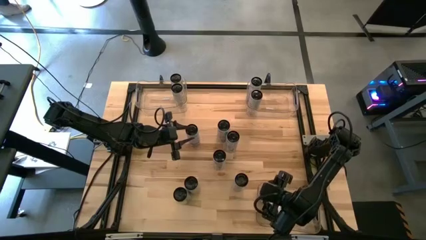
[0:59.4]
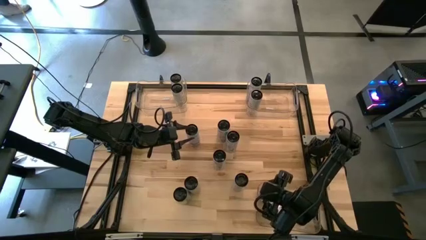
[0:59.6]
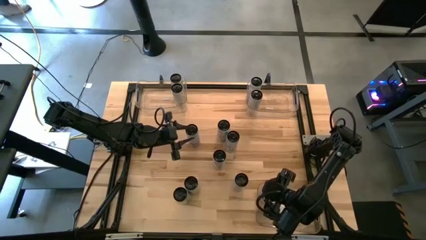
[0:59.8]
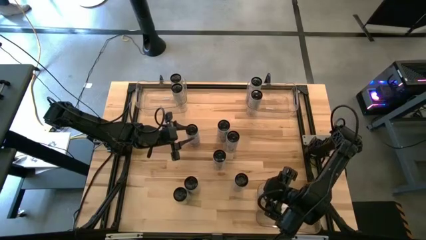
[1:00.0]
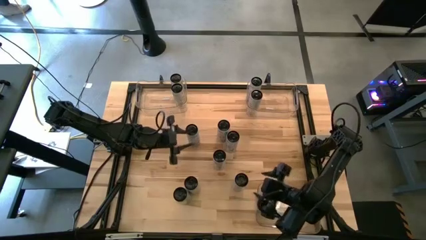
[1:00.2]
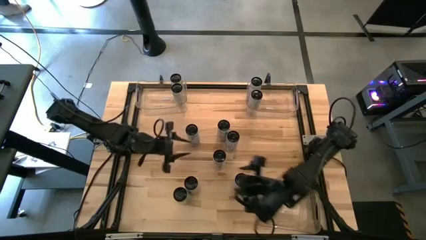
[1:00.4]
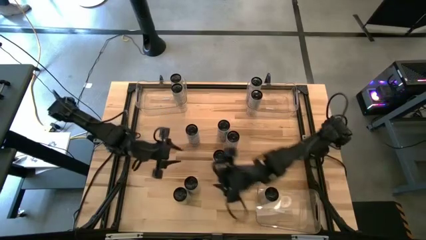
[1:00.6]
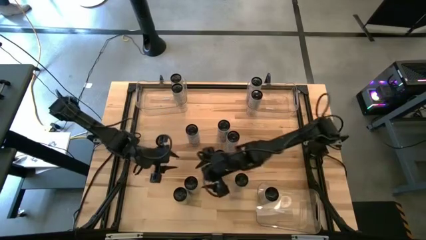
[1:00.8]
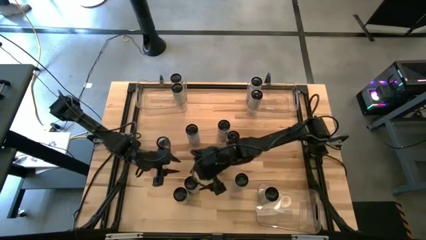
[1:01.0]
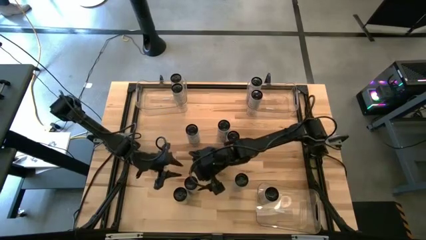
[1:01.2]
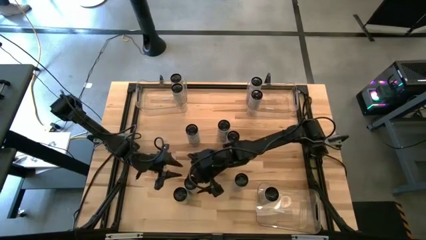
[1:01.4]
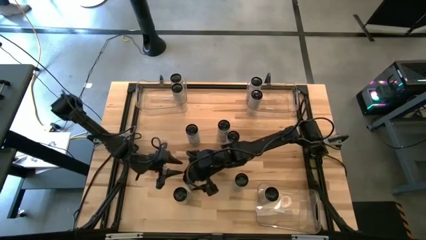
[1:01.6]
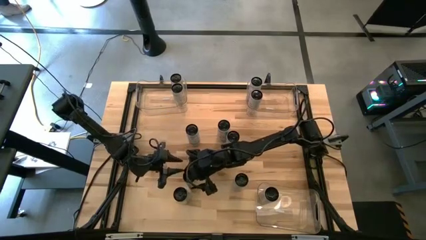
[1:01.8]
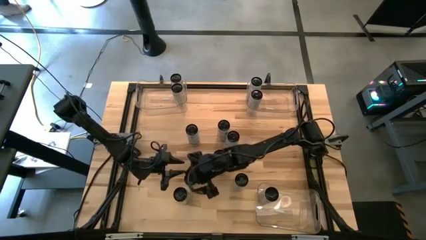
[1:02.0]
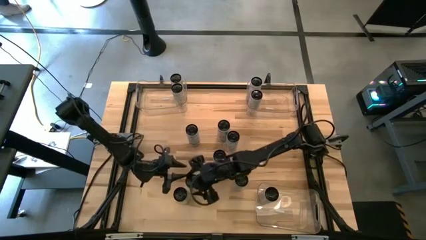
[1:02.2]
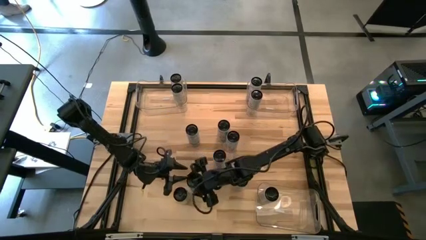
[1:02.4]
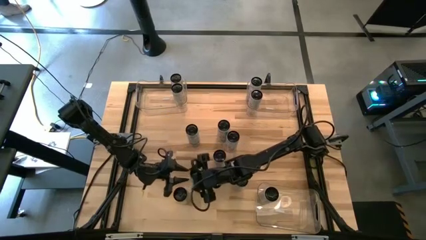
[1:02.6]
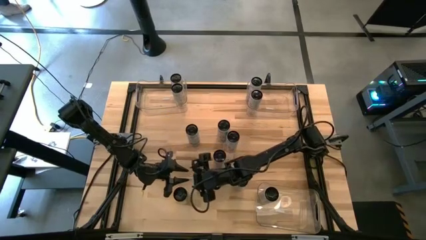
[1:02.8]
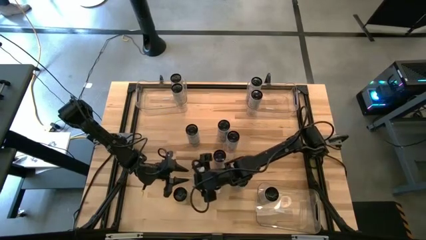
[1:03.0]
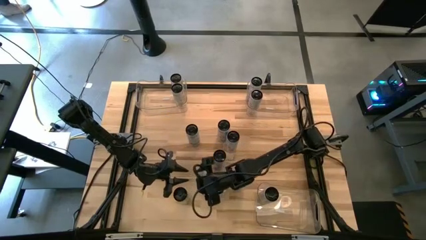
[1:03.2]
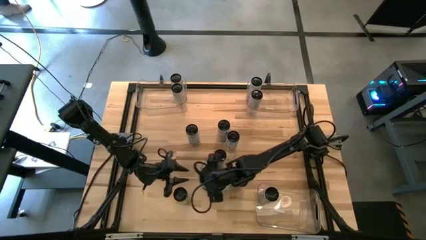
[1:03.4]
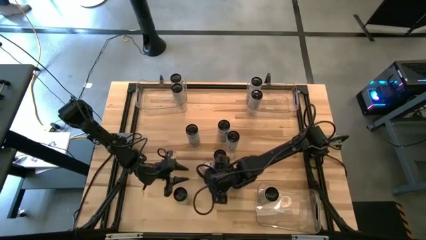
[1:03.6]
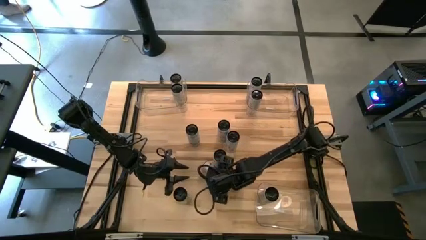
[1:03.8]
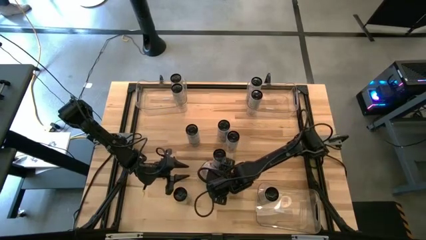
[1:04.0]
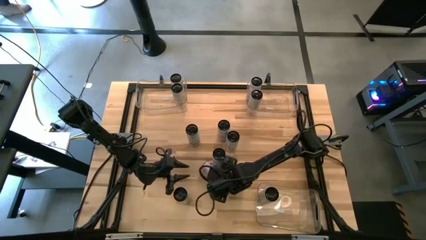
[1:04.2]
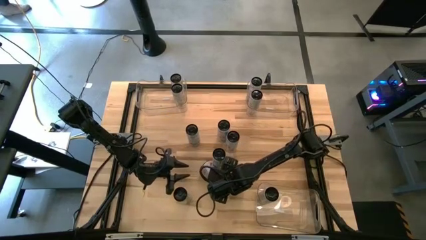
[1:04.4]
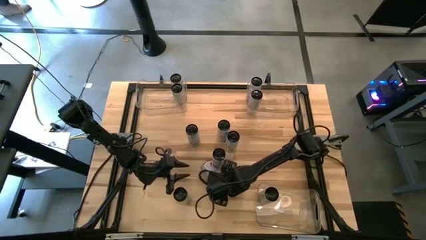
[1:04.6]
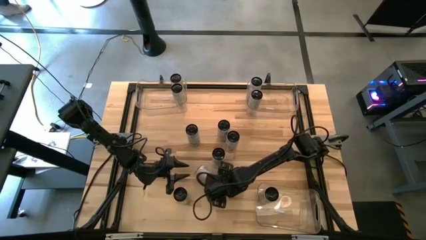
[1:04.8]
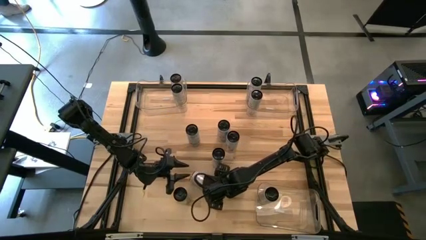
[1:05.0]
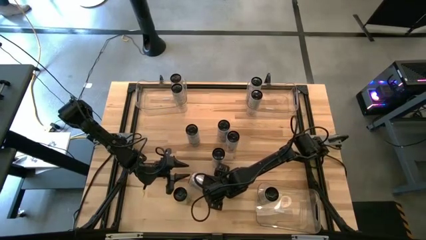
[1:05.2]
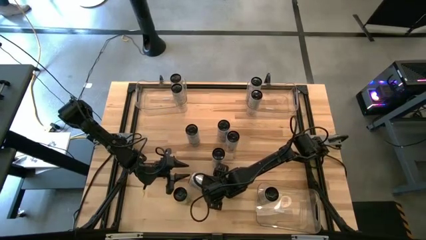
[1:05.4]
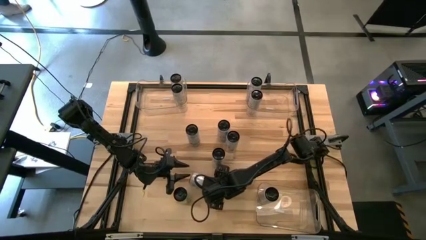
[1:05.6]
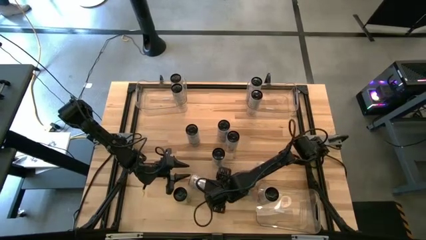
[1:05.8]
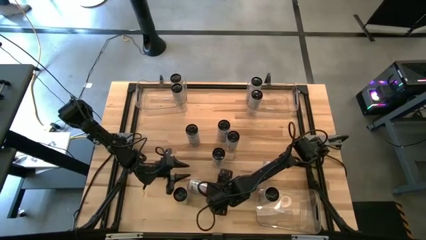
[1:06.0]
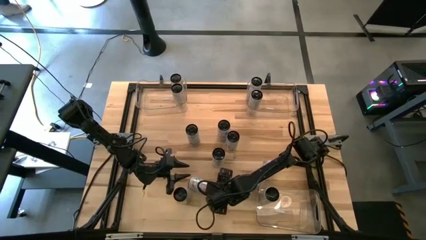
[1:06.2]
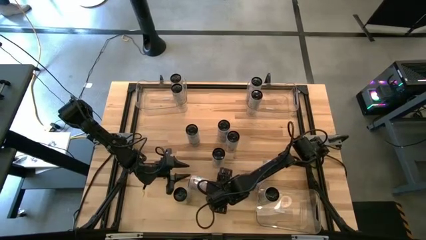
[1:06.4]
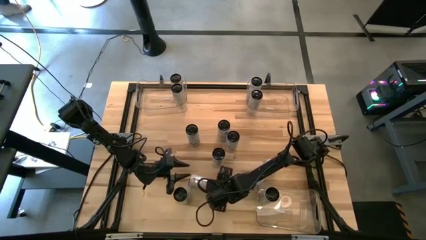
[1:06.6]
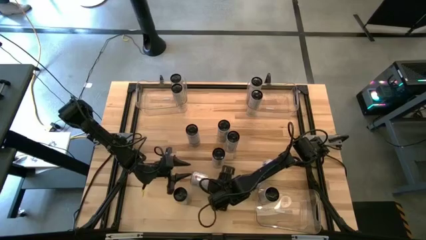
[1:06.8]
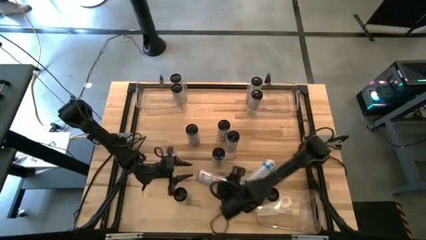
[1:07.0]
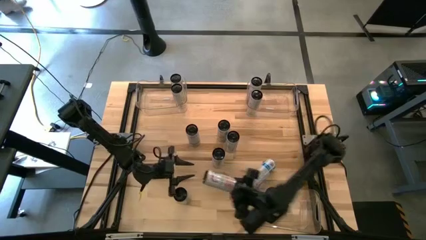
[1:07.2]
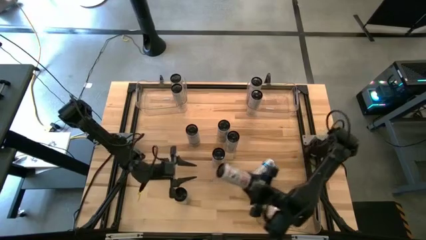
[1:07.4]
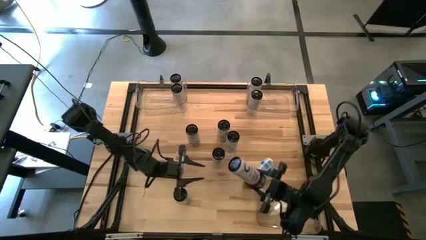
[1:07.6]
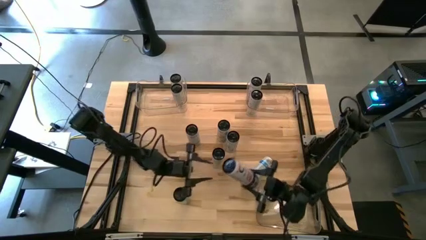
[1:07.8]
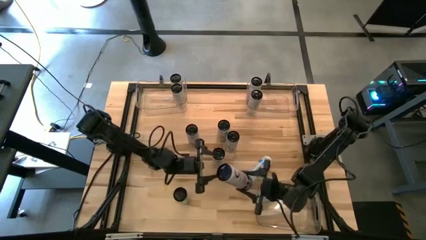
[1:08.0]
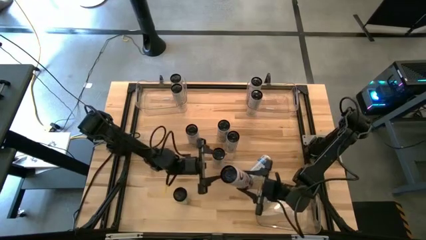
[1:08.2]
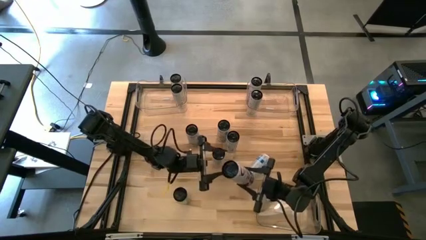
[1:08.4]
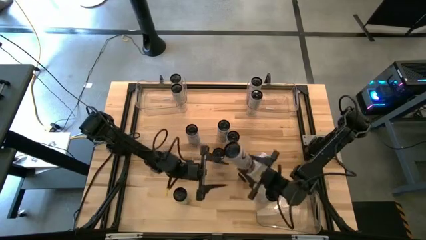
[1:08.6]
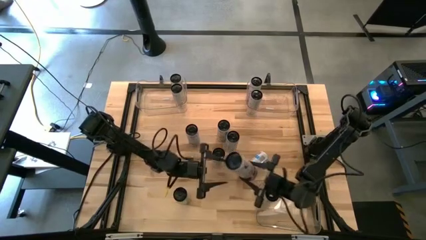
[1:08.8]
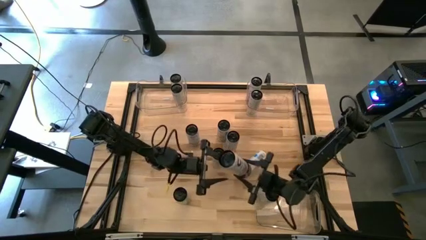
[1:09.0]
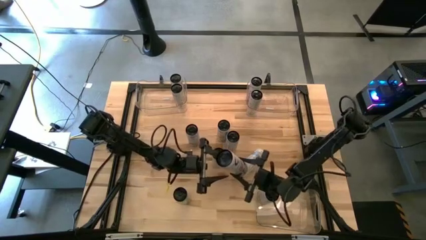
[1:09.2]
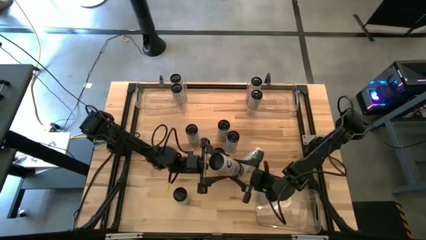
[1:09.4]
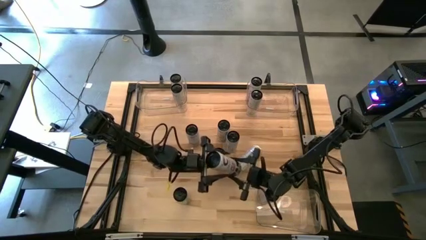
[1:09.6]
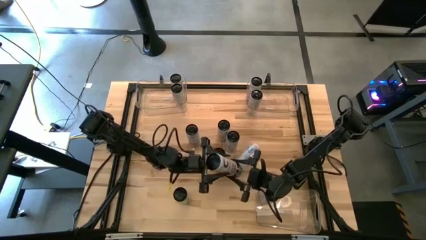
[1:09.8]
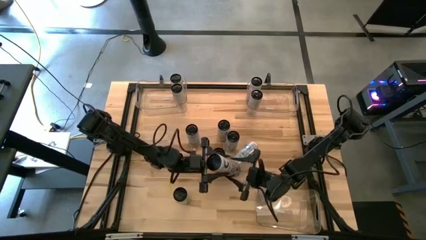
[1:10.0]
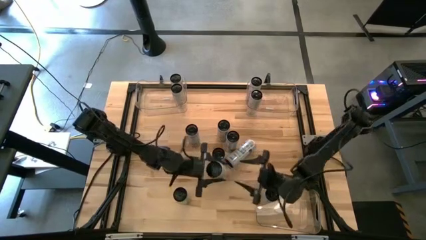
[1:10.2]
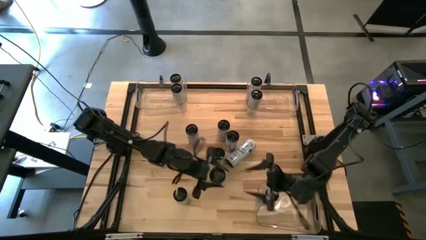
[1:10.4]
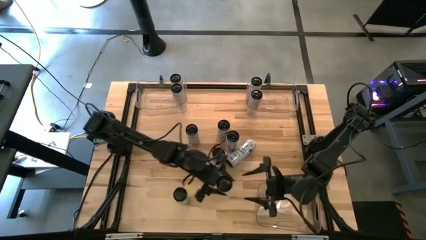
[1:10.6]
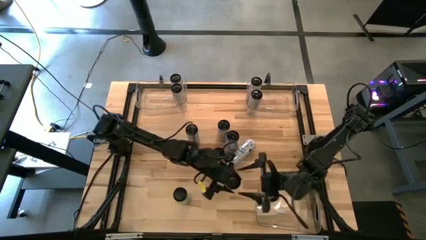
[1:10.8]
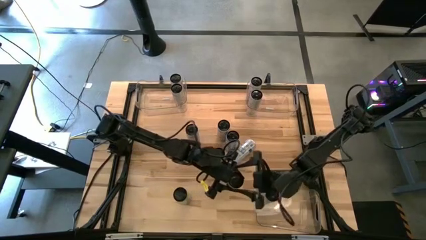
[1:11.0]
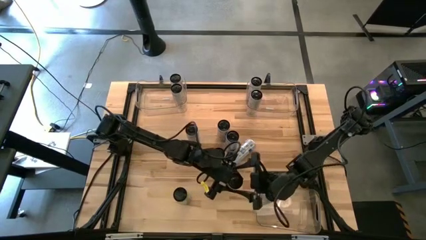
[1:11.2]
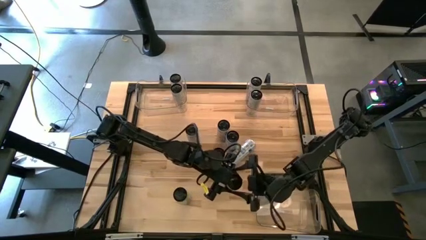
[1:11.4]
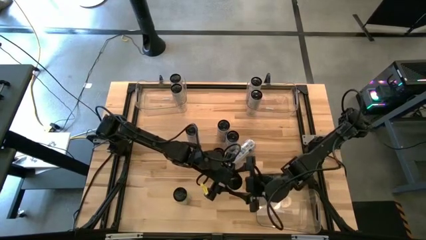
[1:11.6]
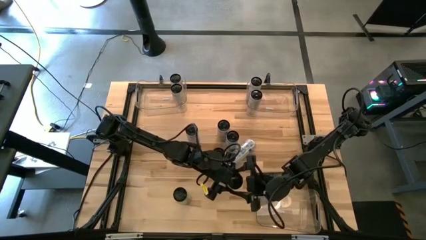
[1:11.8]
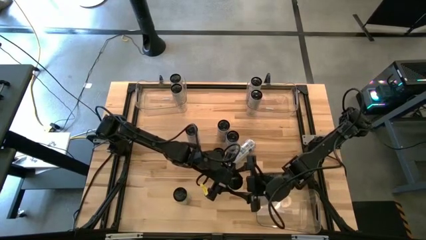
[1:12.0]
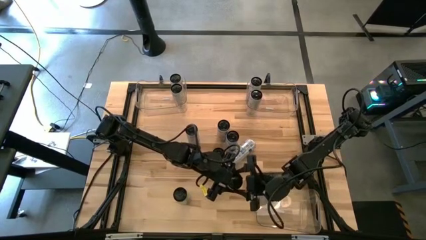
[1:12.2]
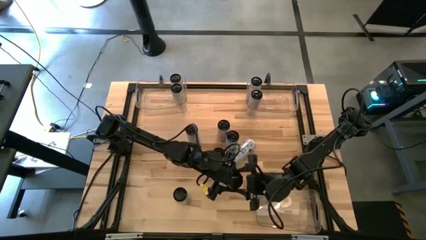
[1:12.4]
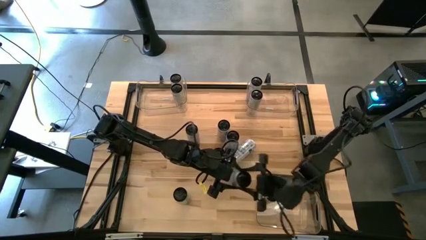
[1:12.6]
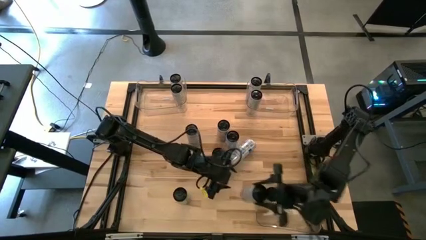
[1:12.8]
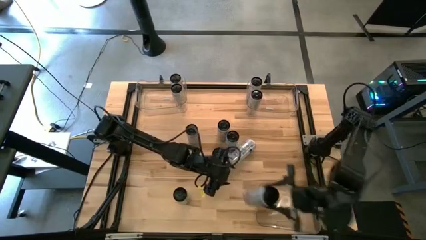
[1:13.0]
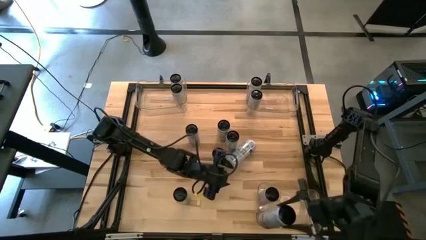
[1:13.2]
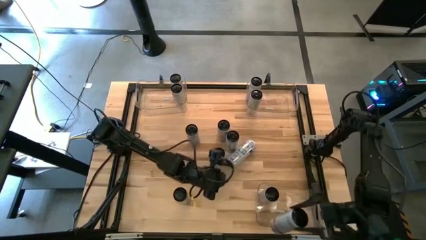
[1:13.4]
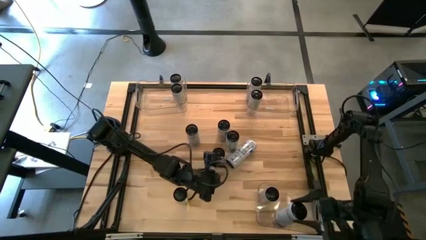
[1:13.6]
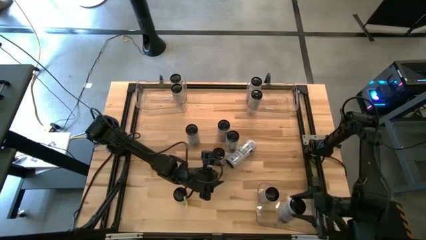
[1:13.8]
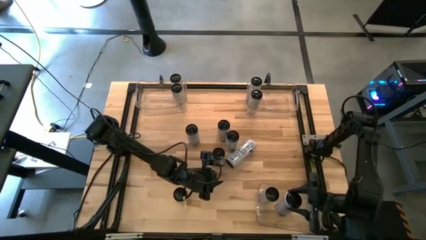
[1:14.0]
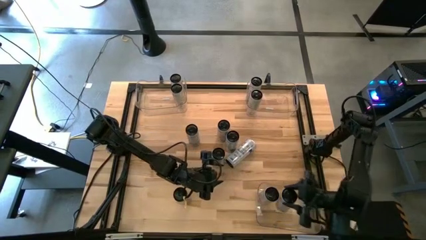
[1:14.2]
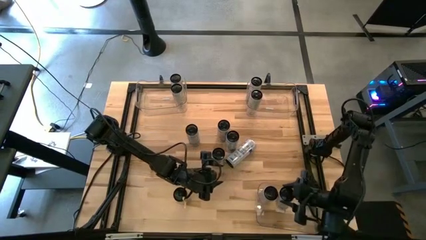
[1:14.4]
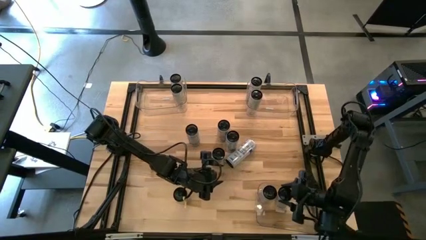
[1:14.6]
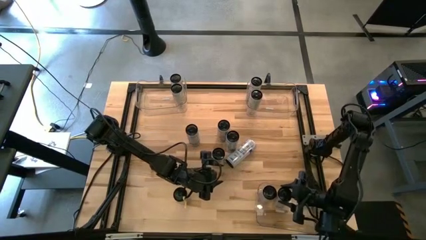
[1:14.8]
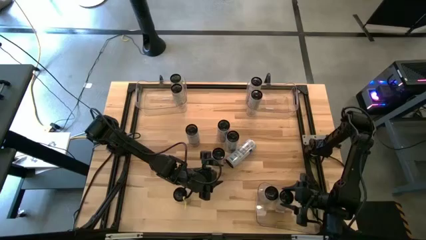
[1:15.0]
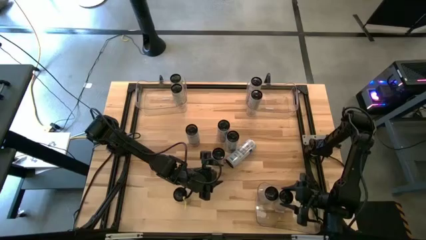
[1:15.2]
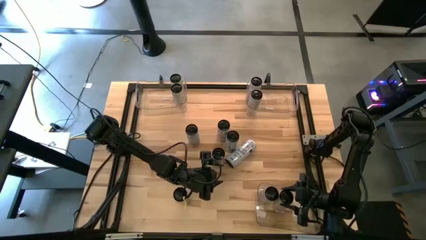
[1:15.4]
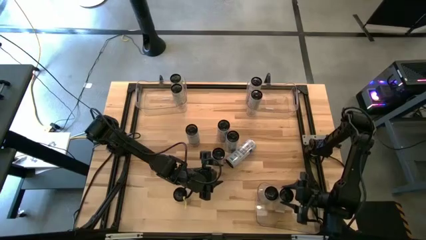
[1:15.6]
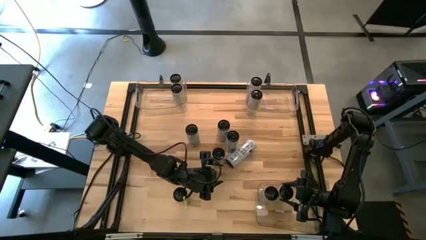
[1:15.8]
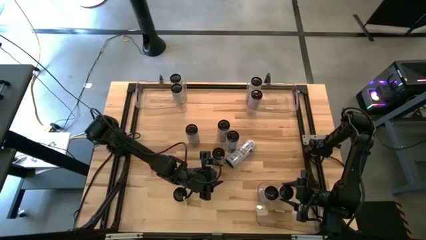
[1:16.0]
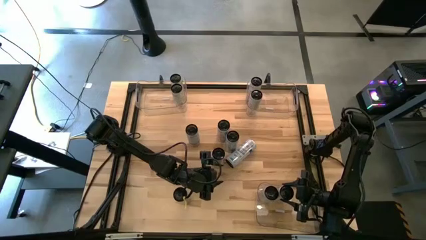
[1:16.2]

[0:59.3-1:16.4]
Task: Sort soda cans
Put the white-pink soda can into the bottom transparent bin

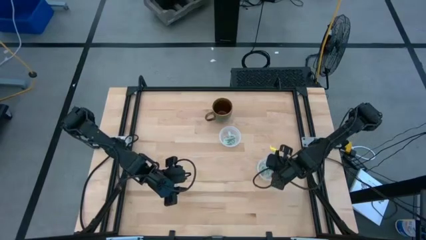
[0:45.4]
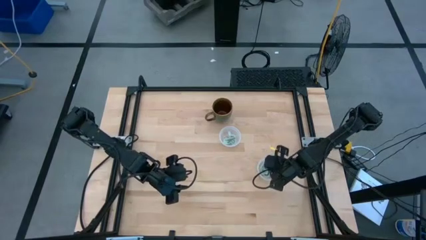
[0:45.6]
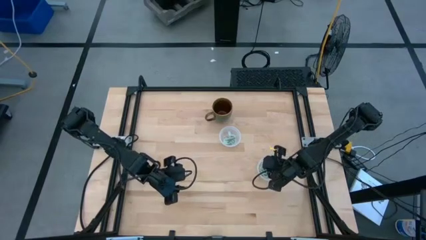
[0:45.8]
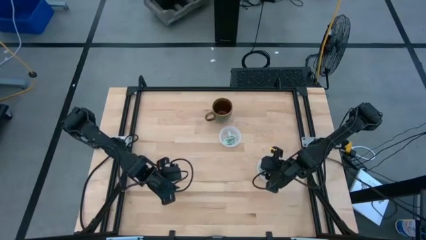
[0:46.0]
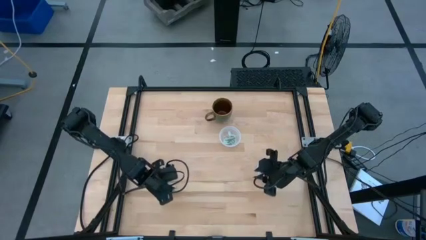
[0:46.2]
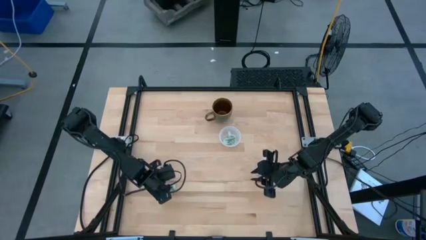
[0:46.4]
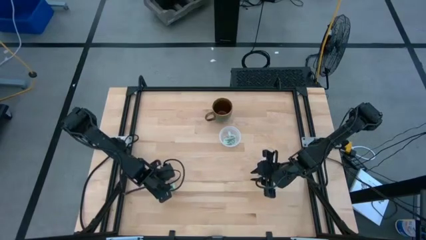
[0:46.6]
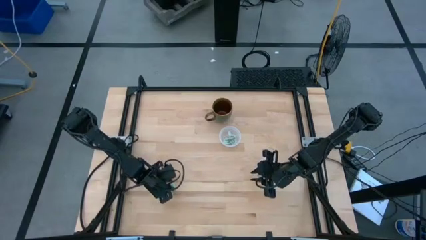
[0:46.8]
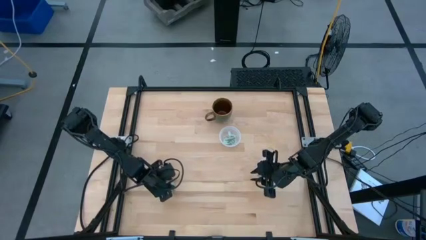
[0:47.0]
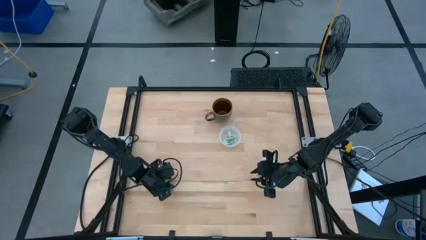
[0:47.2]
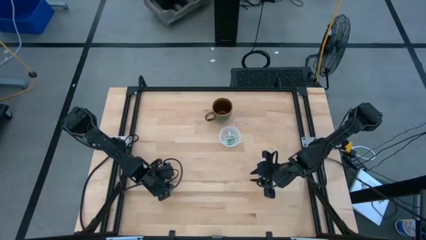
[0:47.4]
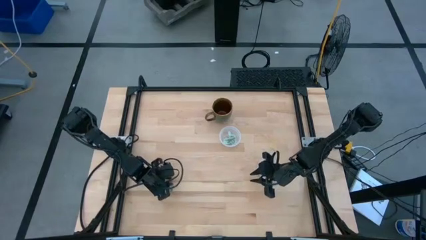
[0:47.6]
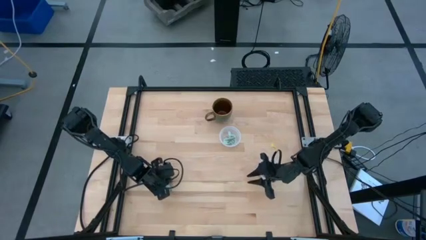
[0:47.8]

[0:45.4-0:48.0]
Task: Pick and place items into bin
Put the stevia packet into the top transparent bin
